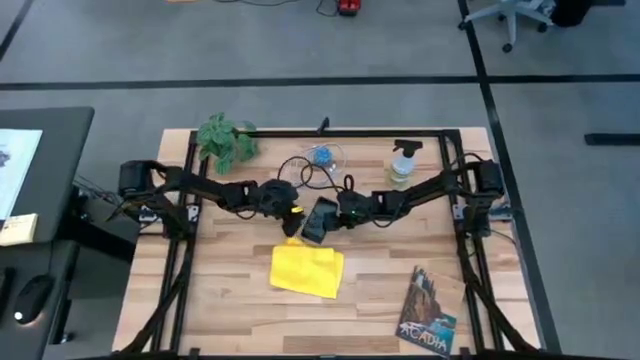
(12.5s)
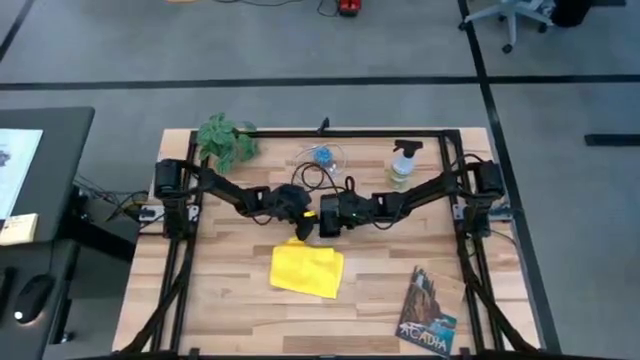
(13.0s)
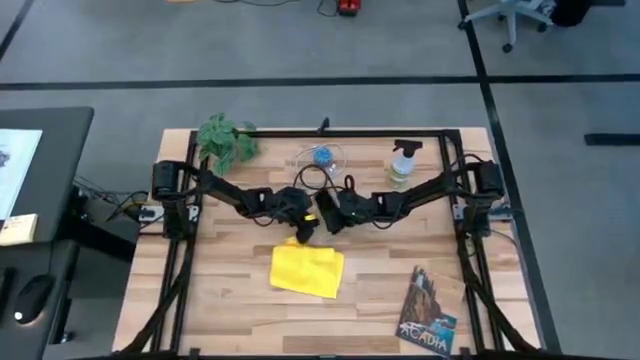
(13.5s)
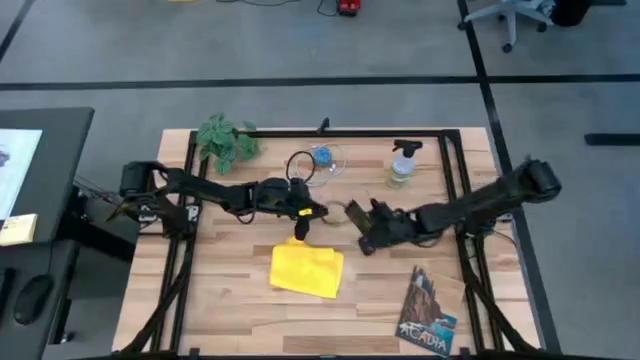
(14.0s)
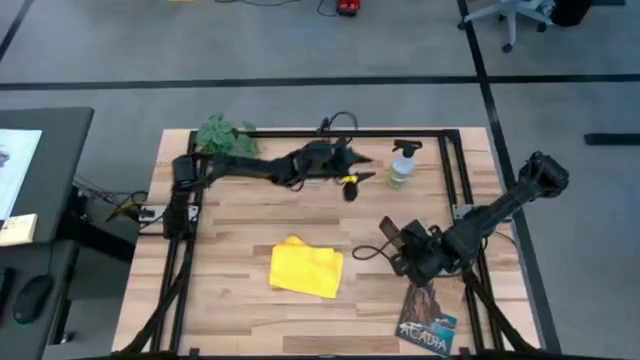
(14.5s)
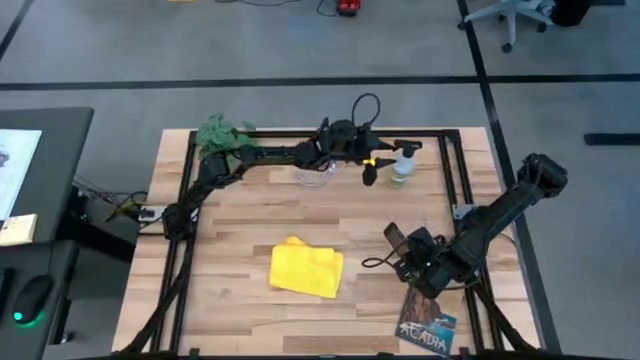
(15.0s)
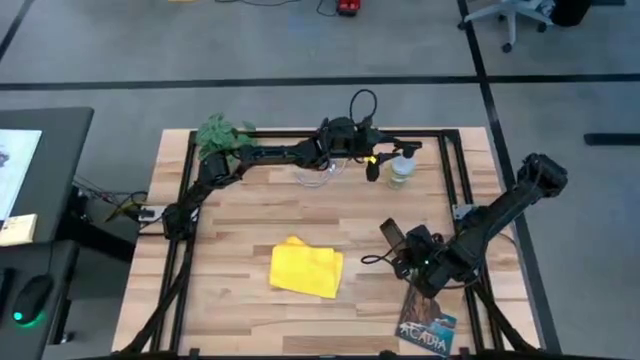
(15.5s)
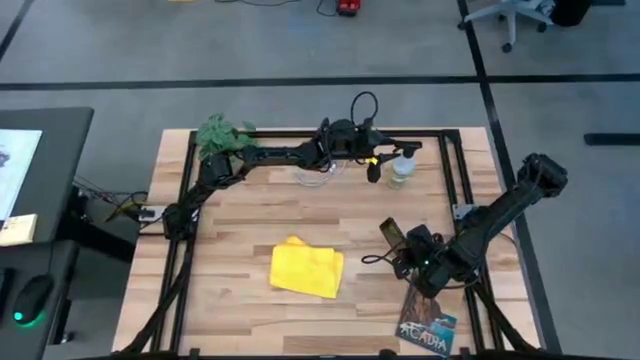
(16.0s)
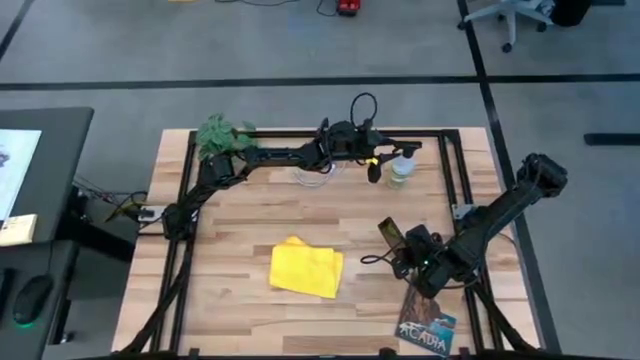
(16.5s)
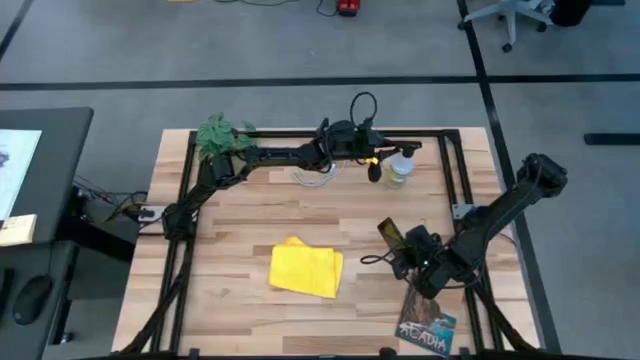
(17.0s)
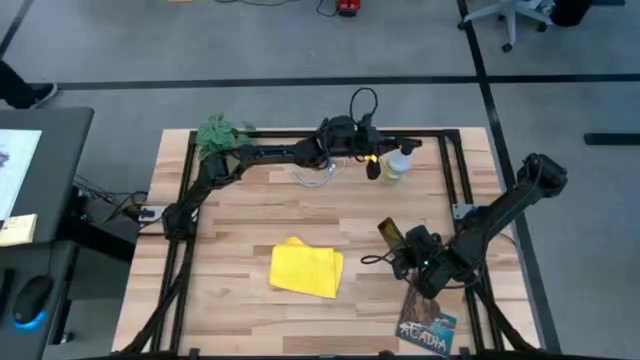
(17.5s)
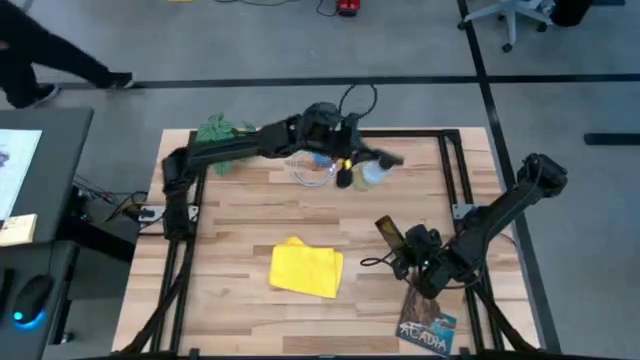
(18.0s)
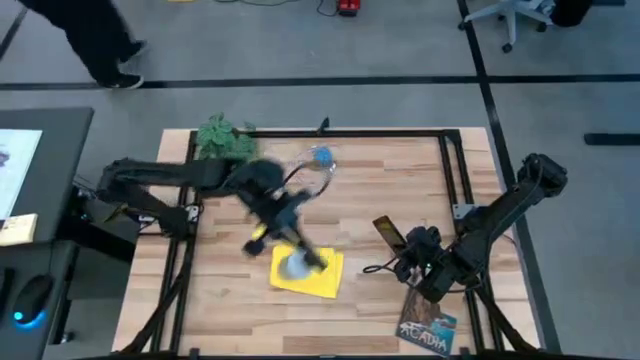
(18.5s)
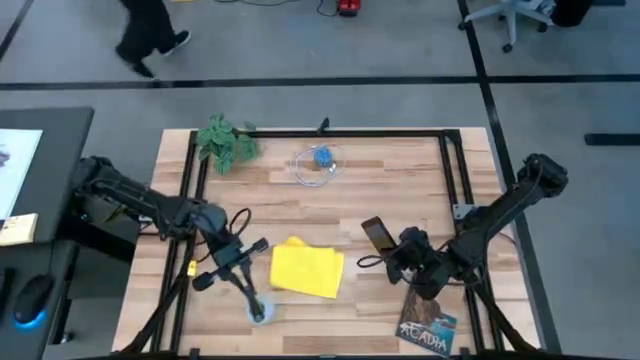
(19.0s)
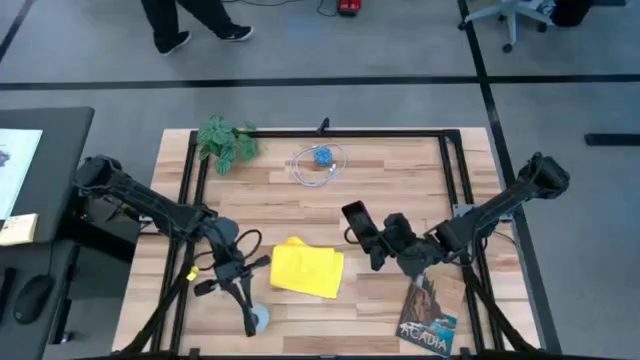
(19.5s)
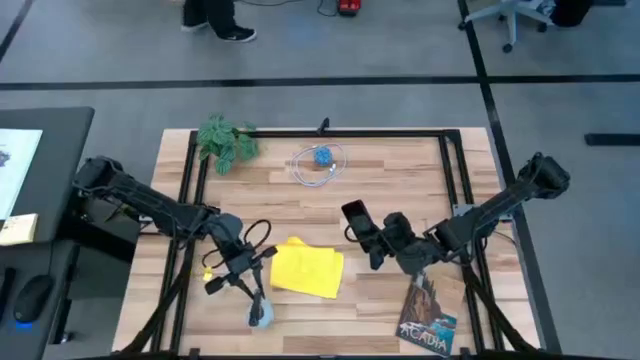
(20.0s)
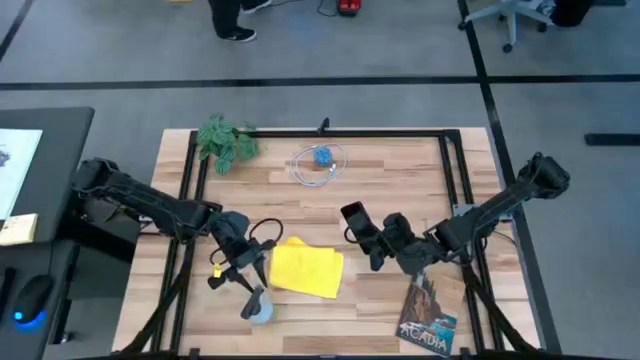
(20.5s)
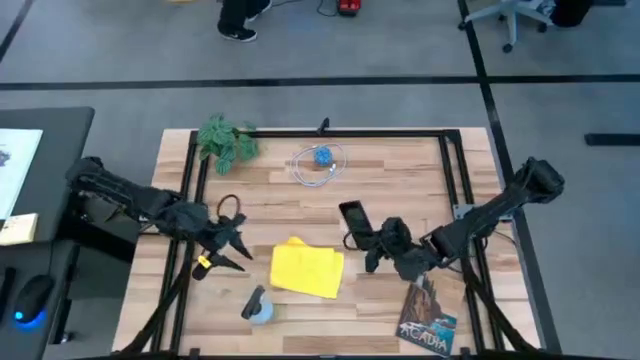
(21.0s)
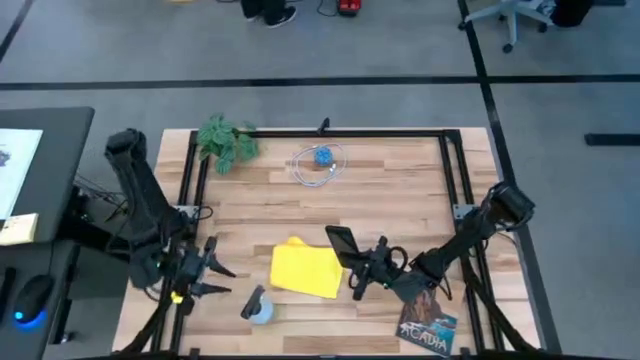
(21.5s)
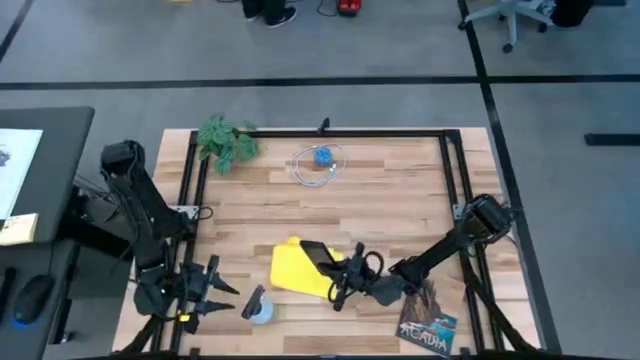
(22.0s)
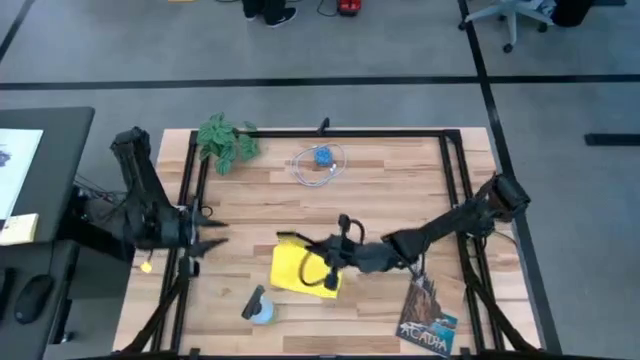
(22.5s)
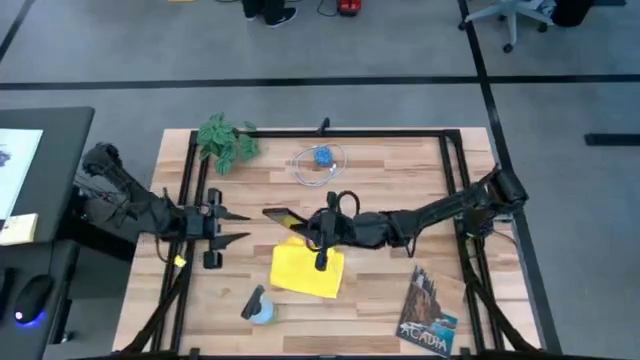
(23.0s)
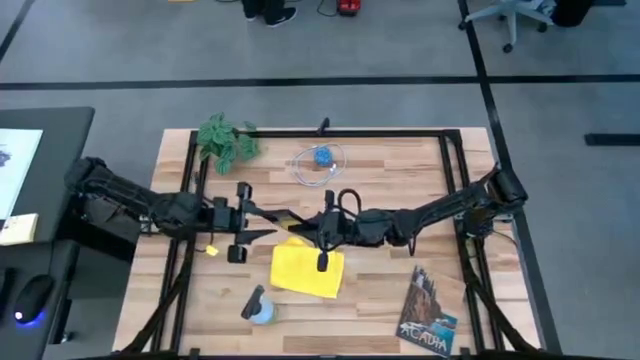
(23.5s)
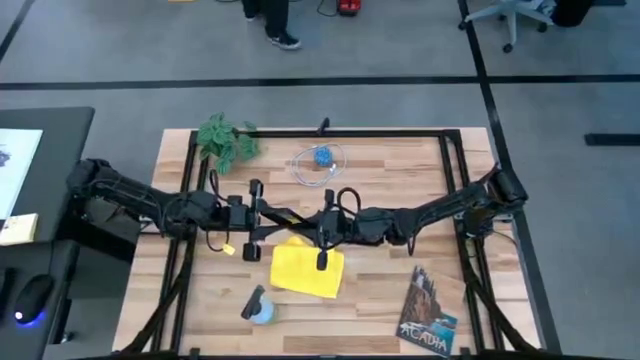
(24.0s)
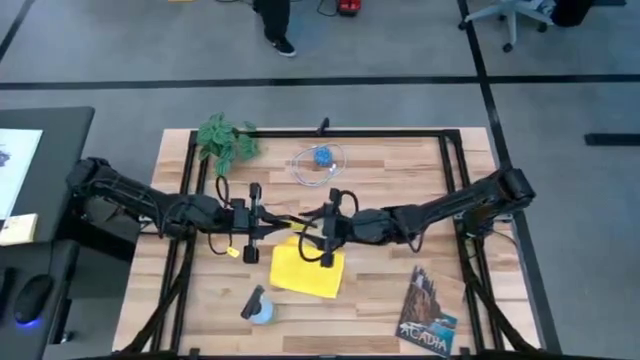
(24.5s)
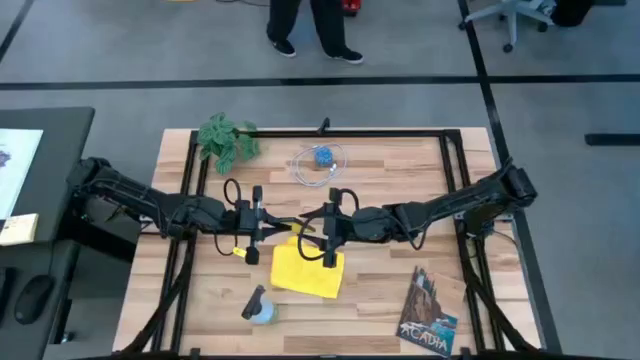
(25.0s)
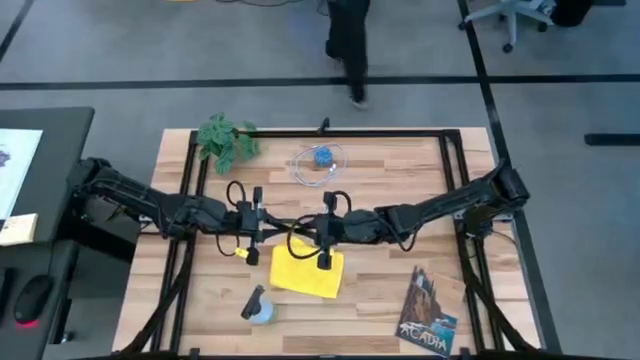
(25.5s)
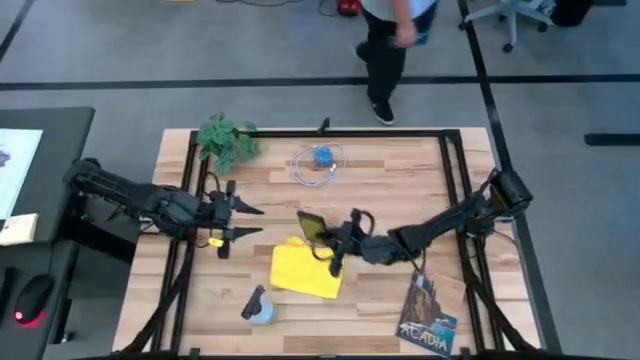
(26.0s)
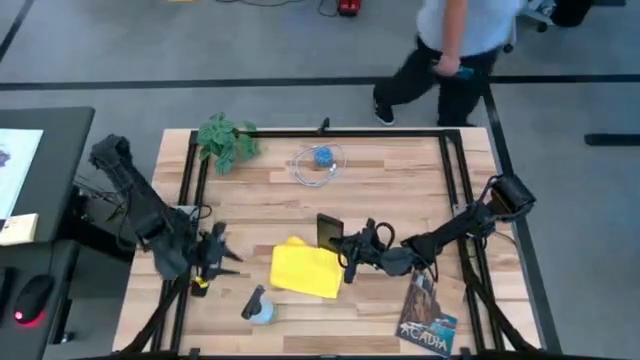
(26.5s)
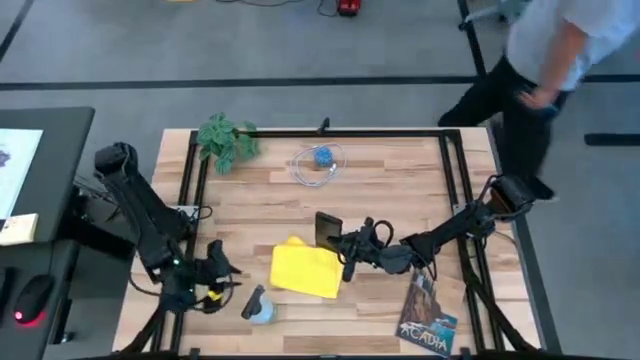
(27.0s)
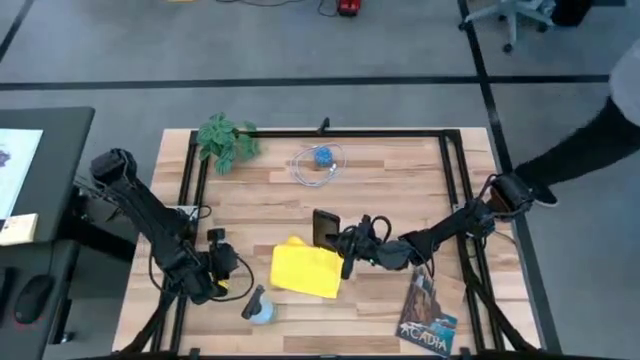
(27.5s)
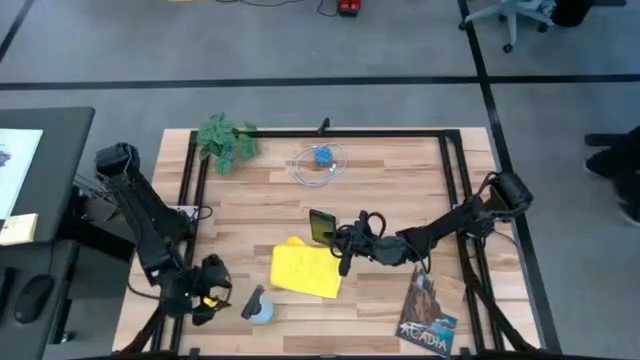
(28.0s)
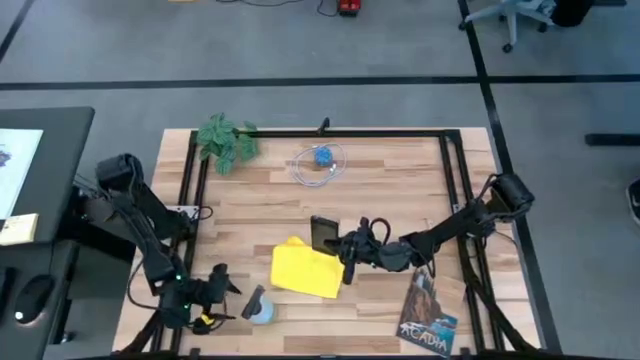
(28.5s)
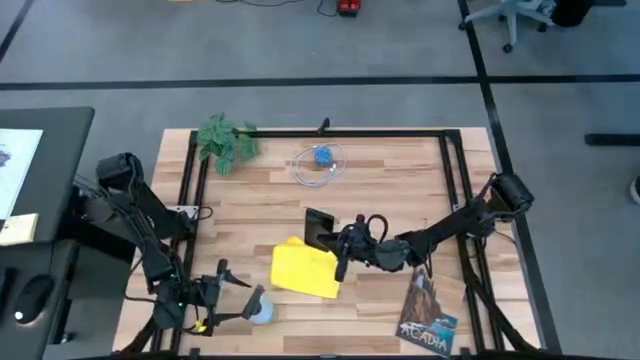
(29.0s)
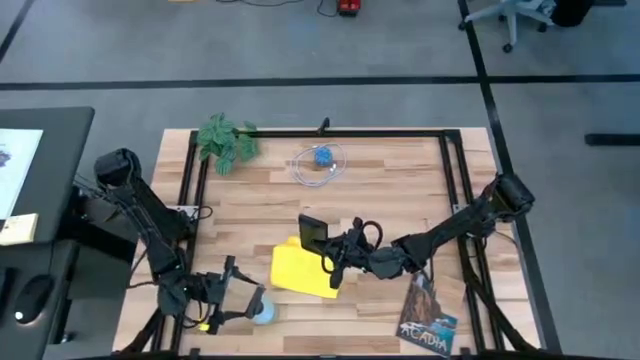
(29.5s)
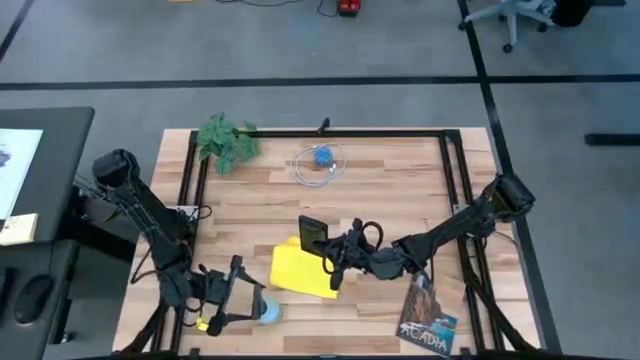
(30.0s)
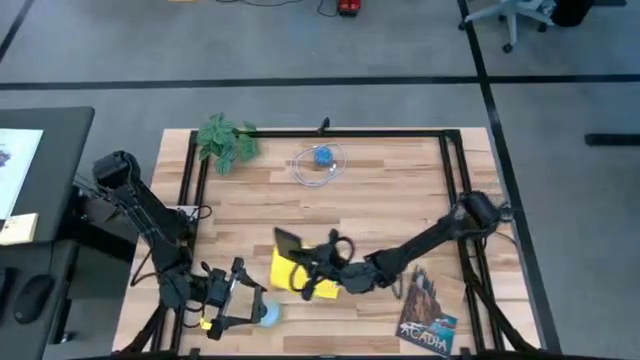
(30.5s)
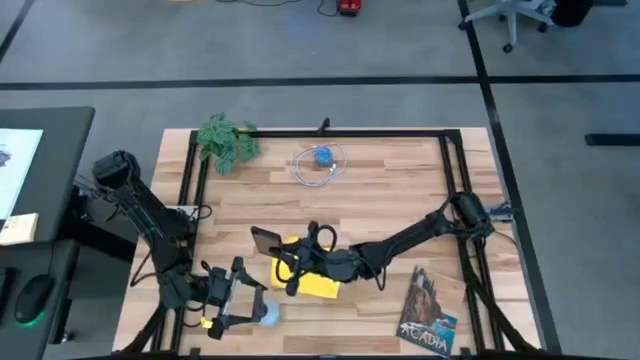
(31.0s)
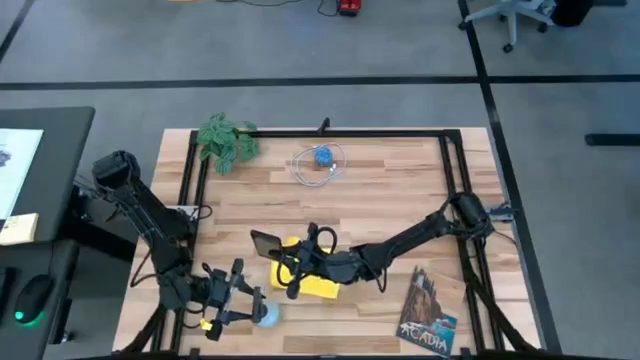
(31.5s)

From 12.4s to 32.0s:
Task: Apply microfiber cloth
Spray the cellphone with the cleaning bottle
